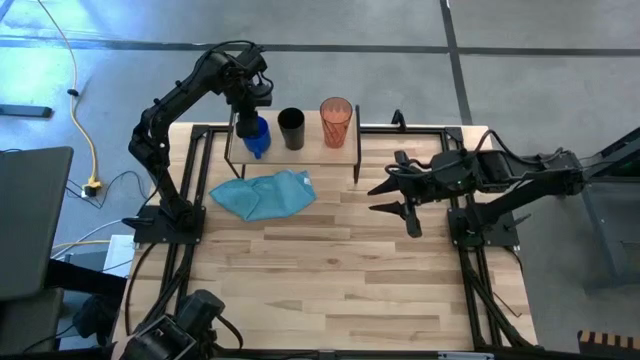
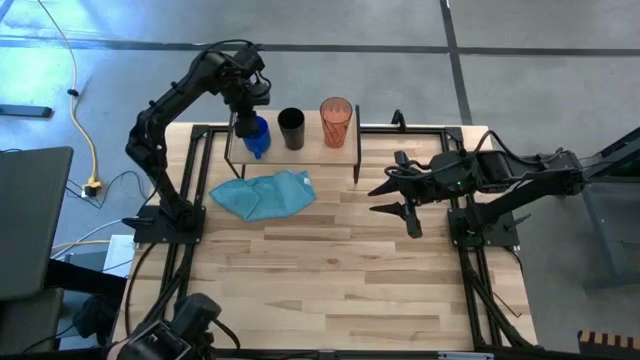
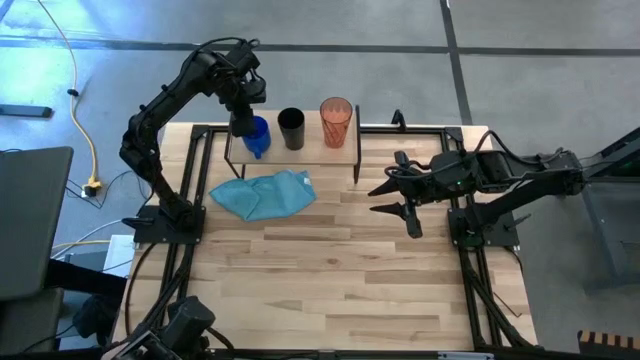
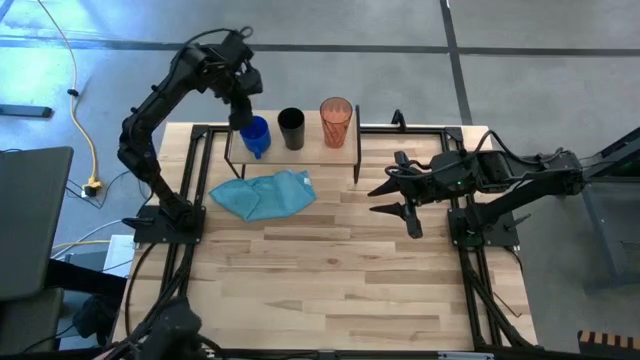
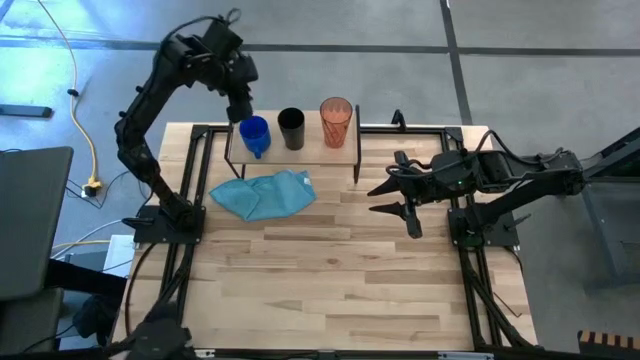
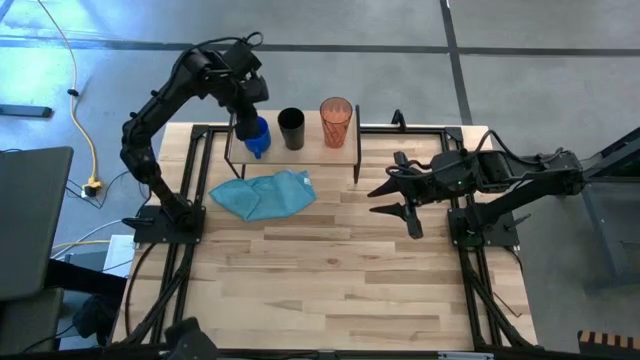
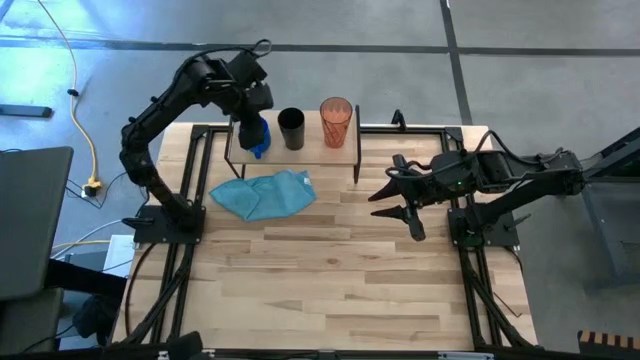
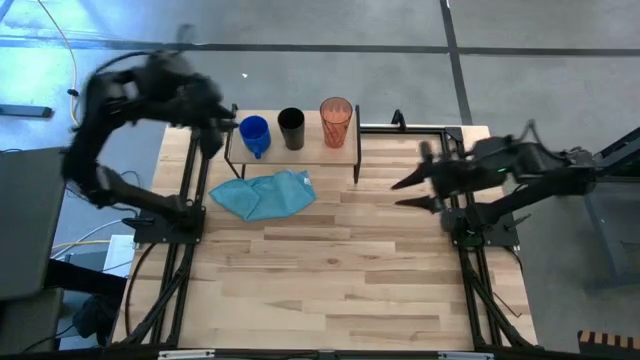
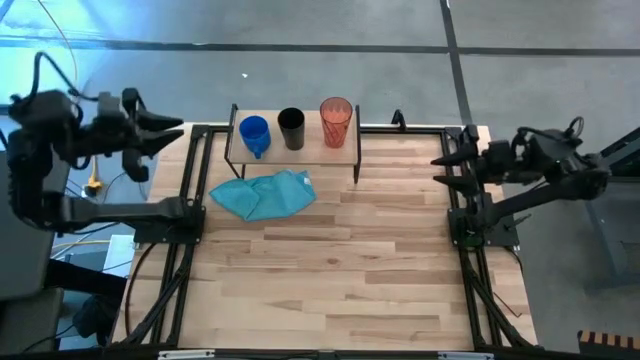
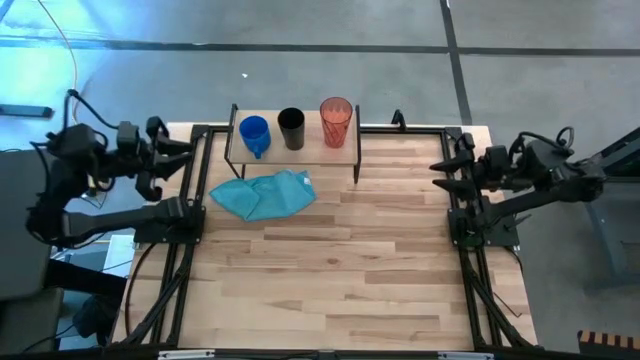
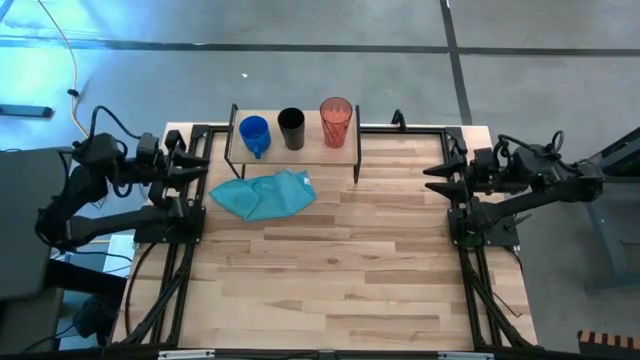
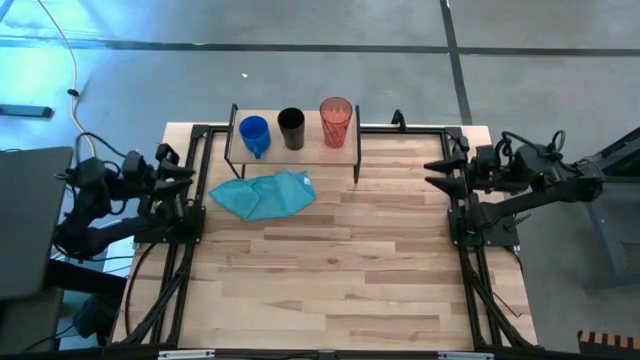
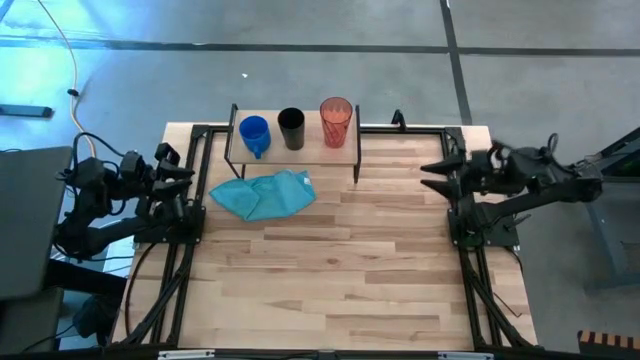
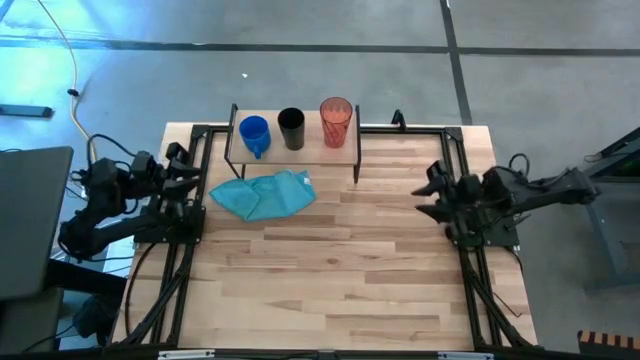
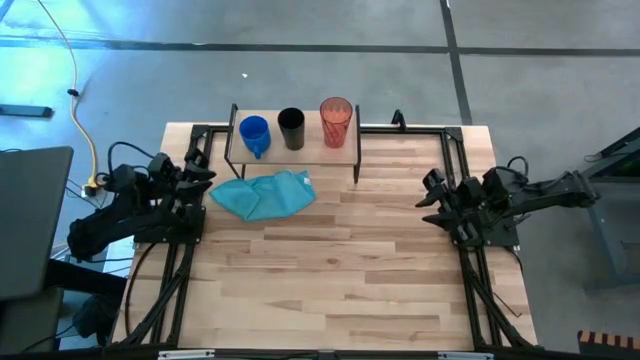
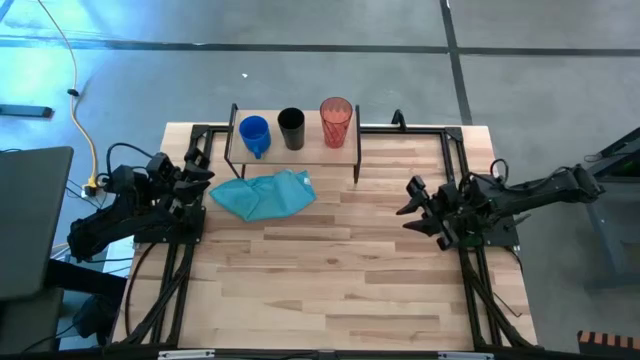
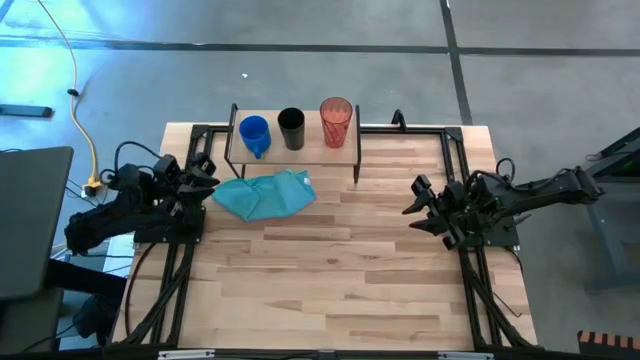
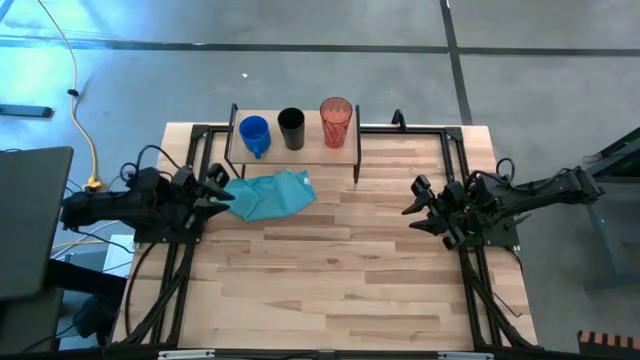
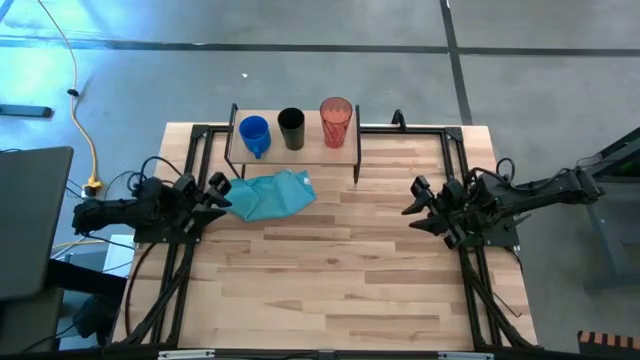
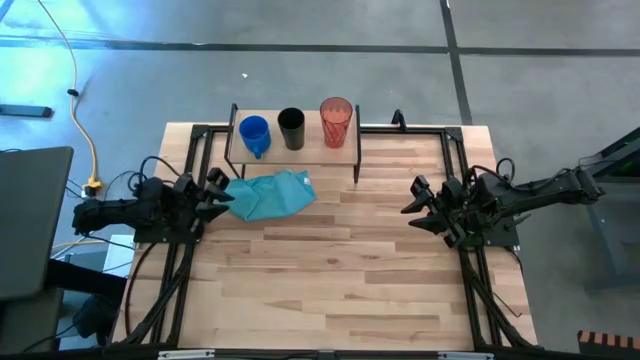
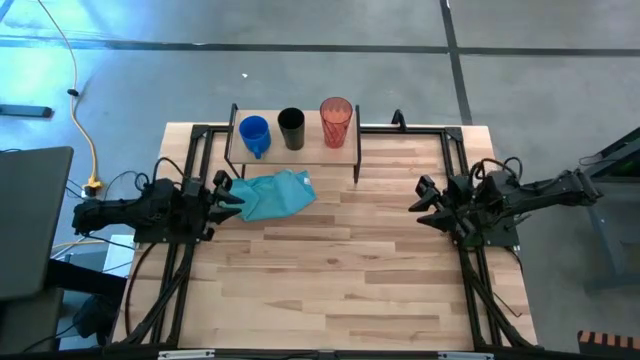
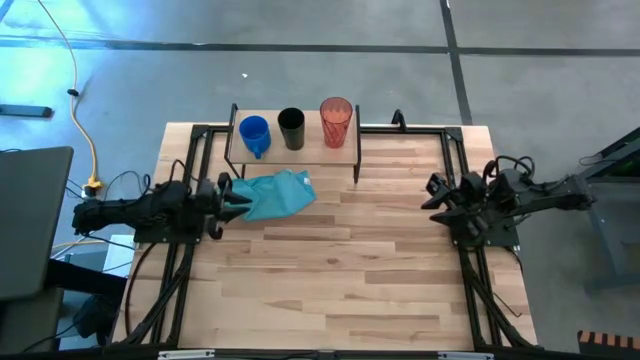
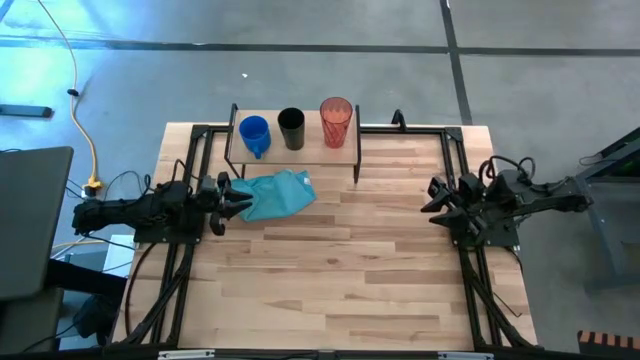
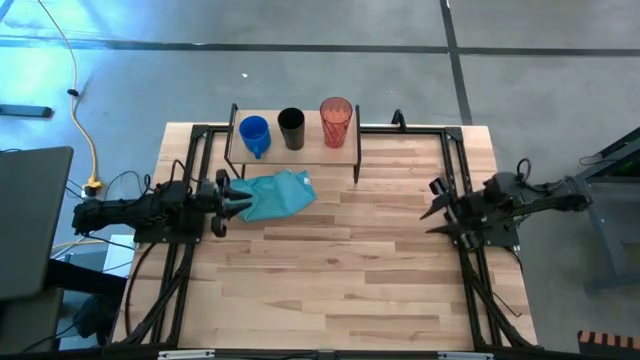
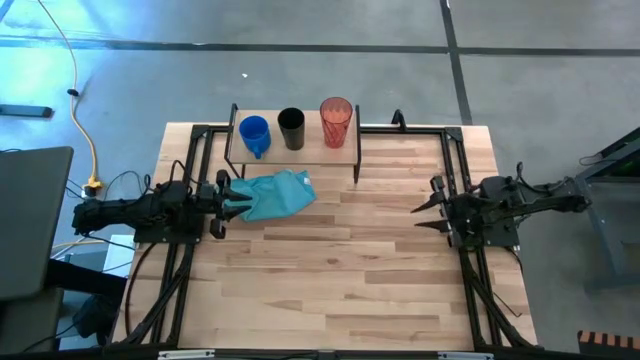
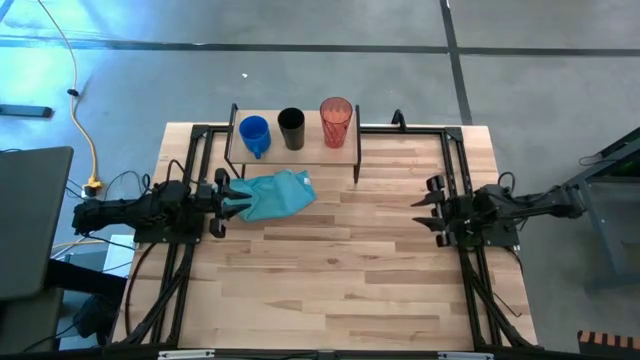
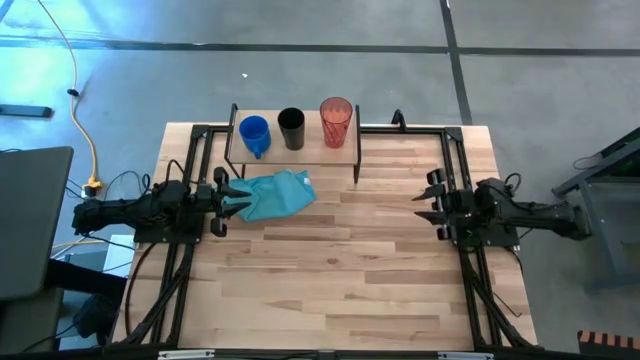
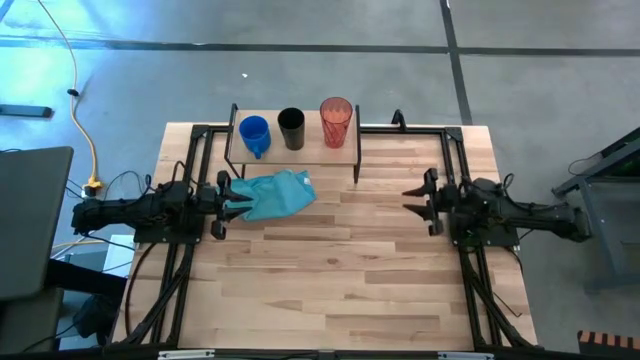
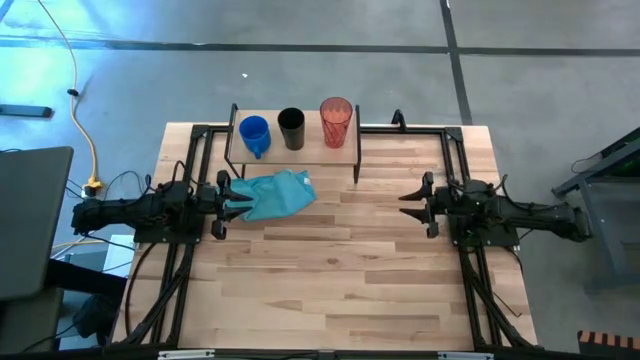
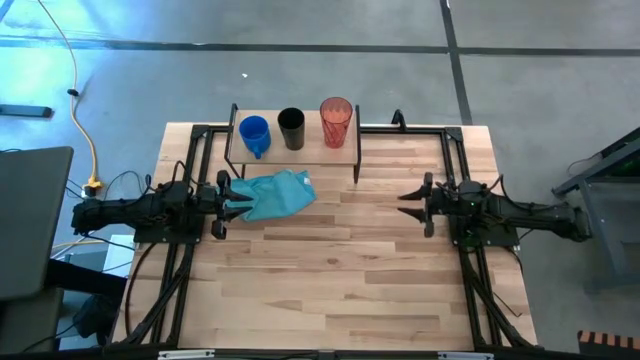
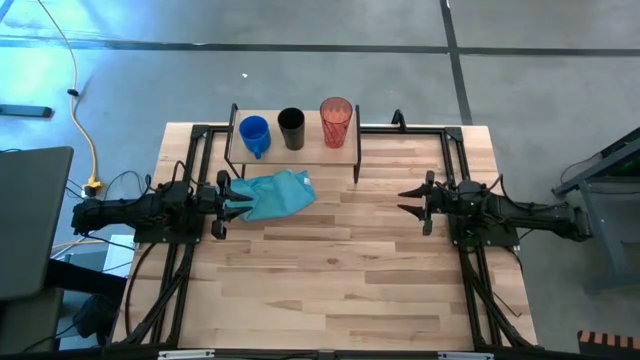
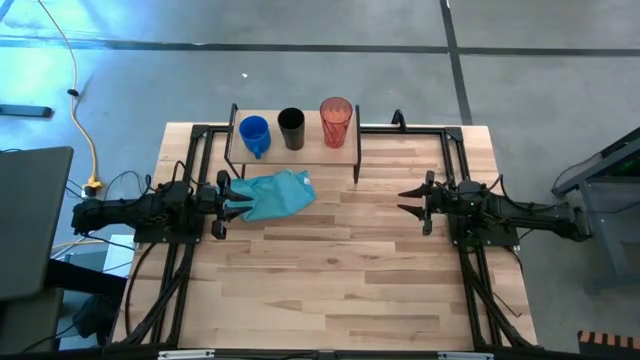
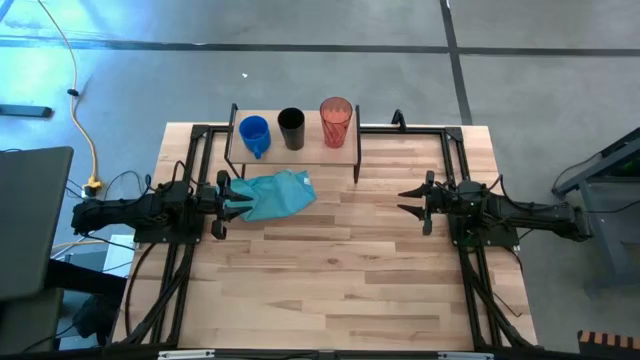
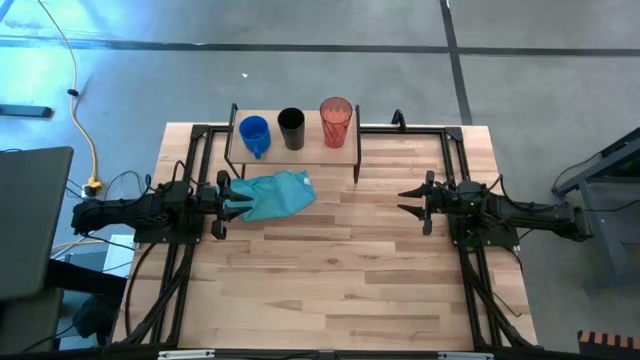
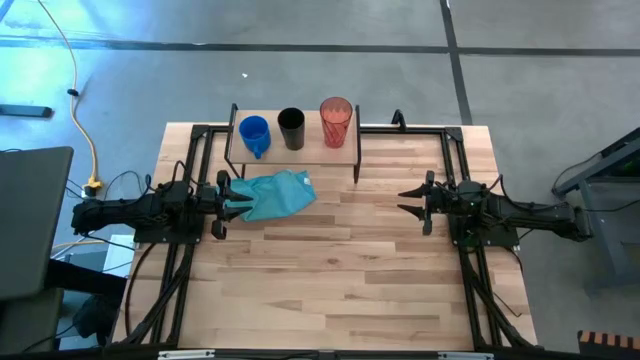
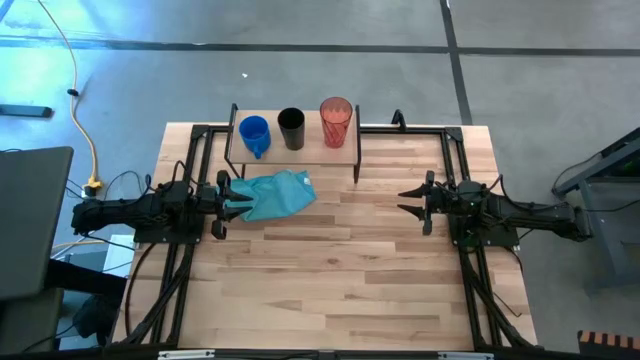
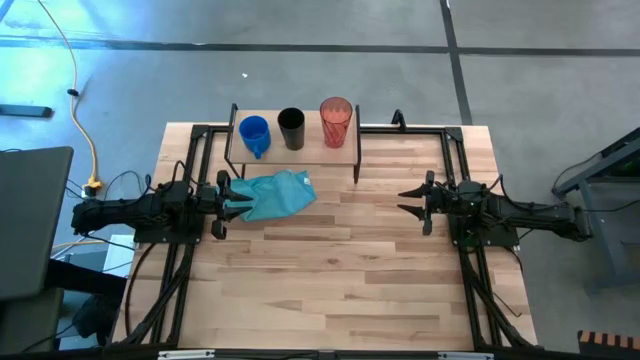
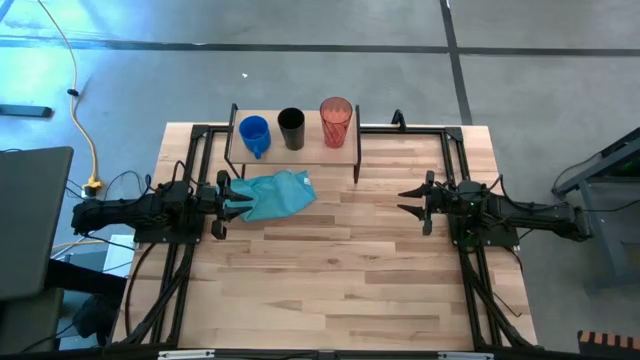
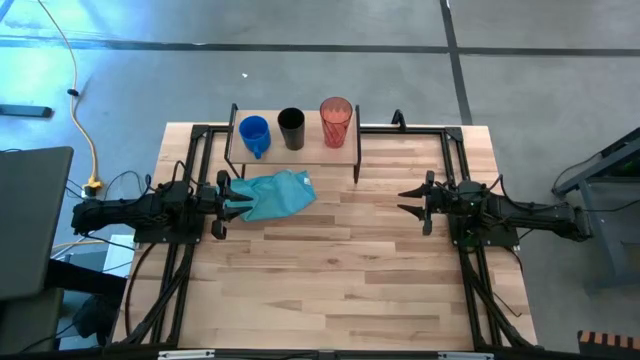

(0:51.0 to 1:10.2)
Task: Stack small to large cups/mugs on shelf
Return to Home Position
